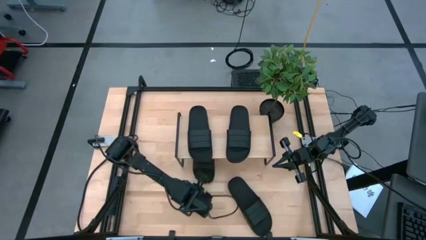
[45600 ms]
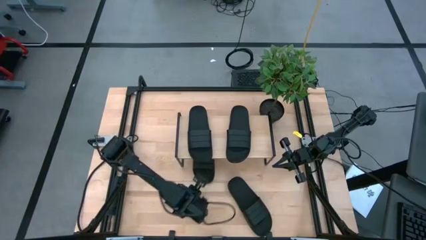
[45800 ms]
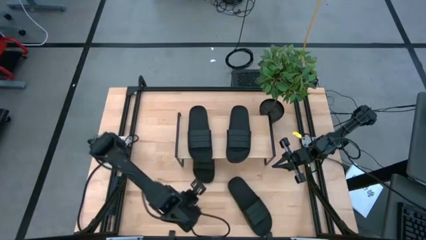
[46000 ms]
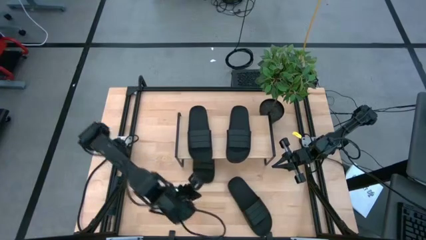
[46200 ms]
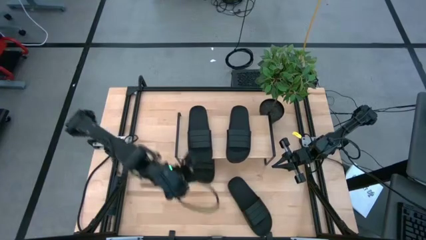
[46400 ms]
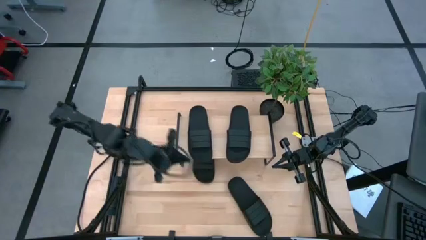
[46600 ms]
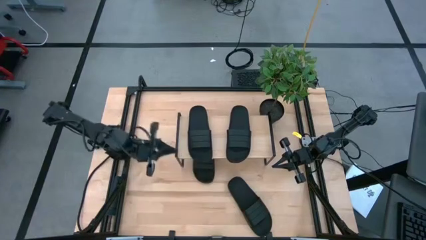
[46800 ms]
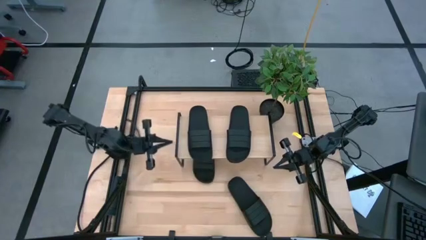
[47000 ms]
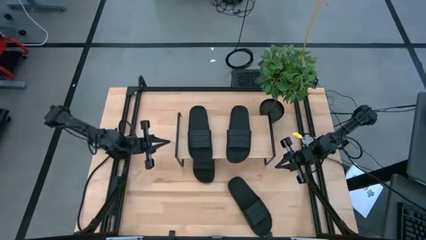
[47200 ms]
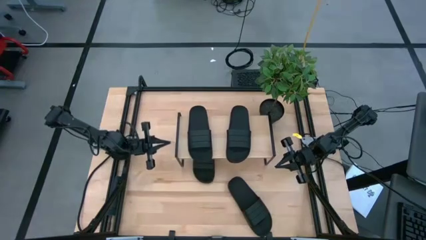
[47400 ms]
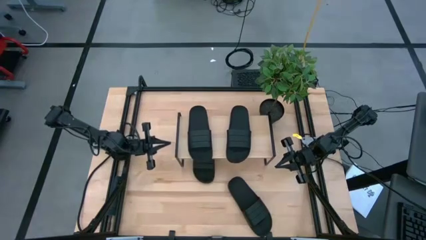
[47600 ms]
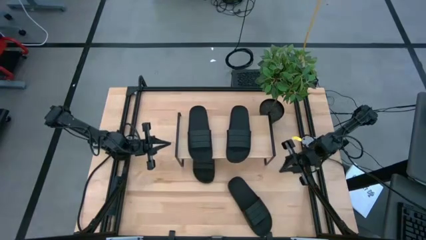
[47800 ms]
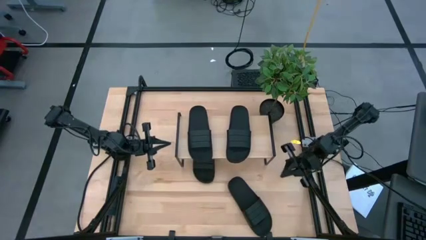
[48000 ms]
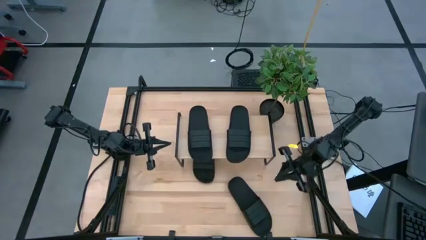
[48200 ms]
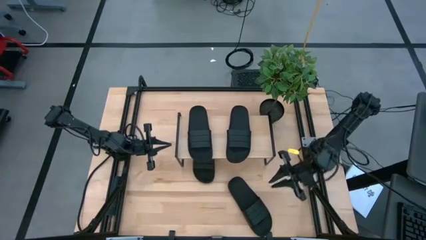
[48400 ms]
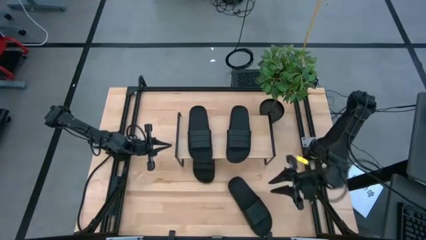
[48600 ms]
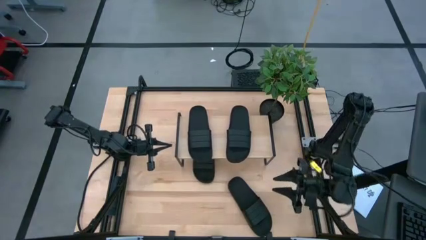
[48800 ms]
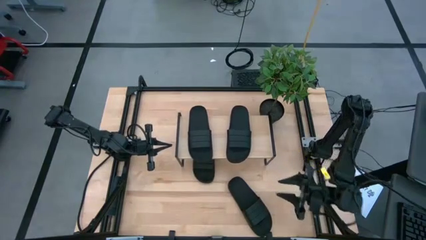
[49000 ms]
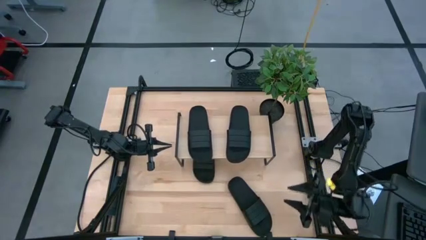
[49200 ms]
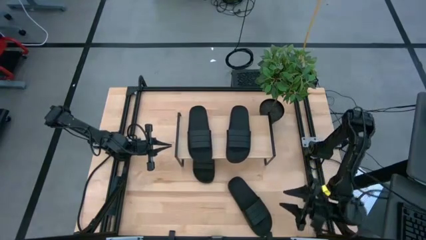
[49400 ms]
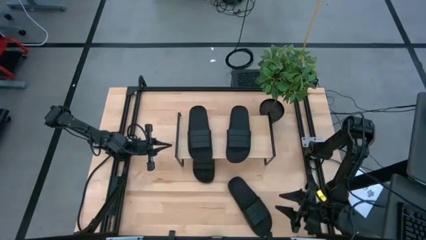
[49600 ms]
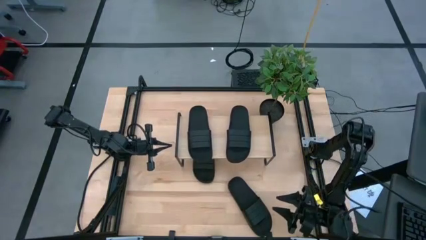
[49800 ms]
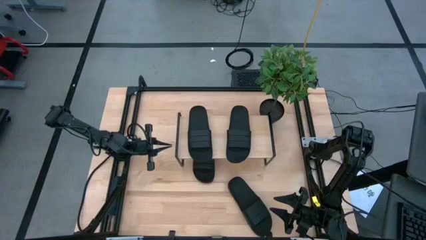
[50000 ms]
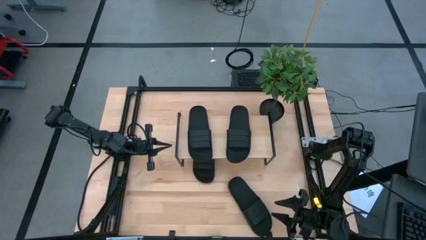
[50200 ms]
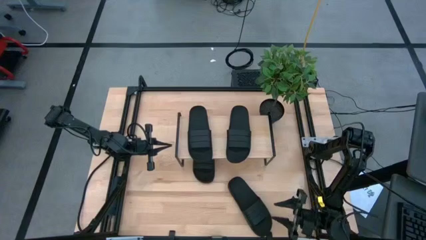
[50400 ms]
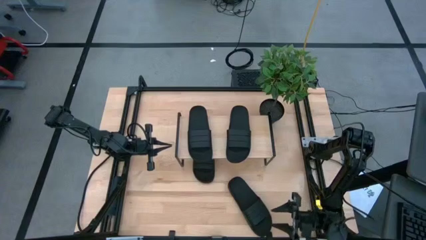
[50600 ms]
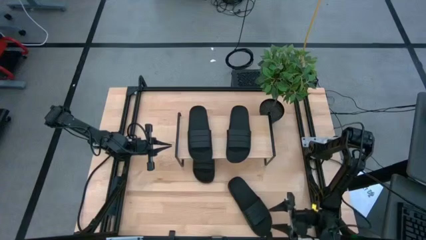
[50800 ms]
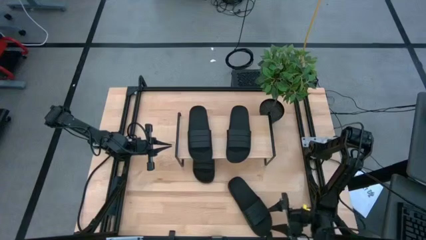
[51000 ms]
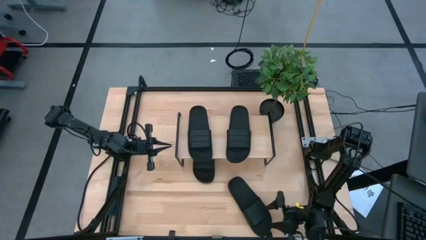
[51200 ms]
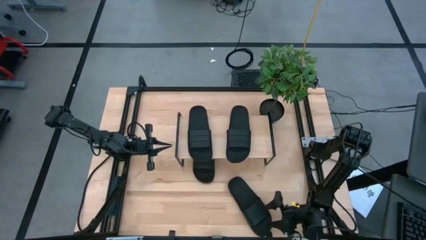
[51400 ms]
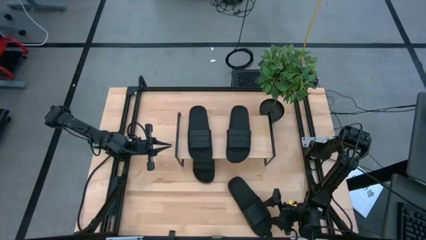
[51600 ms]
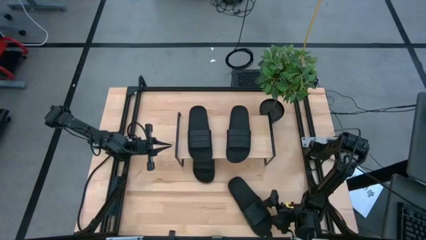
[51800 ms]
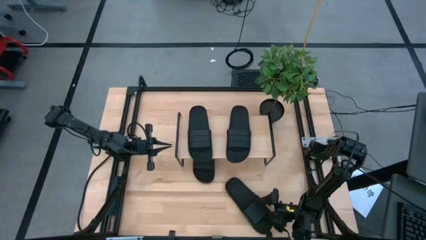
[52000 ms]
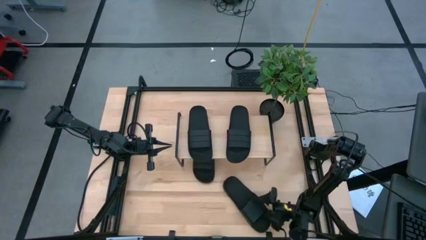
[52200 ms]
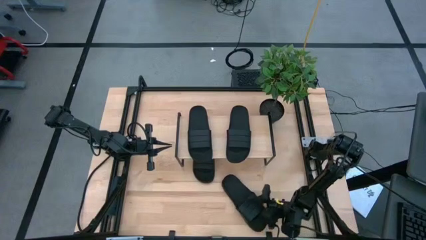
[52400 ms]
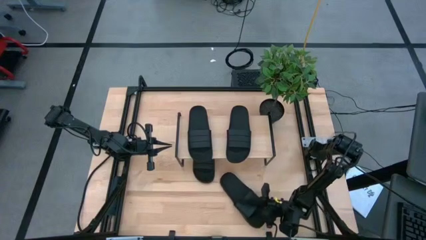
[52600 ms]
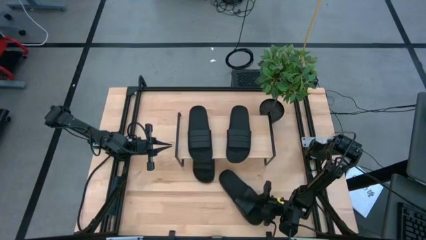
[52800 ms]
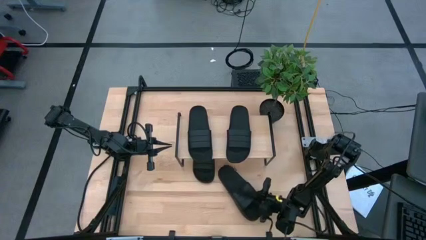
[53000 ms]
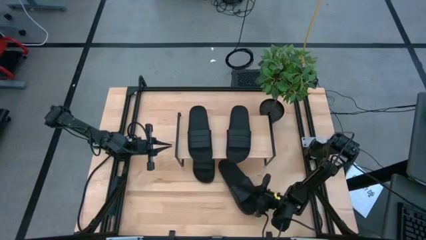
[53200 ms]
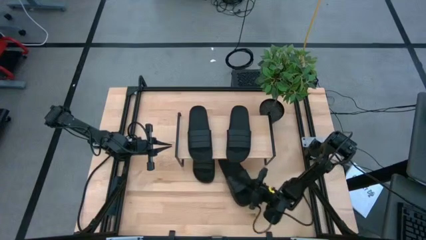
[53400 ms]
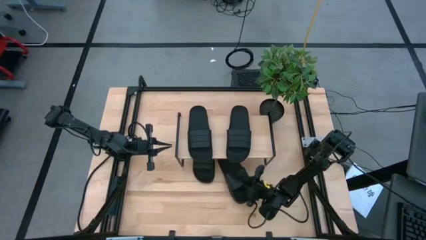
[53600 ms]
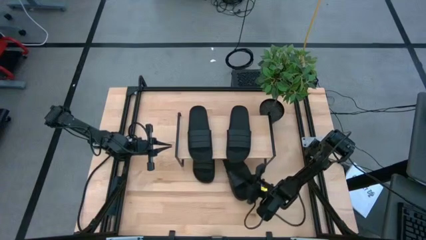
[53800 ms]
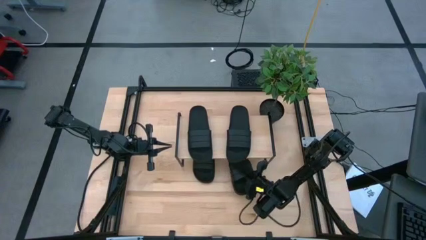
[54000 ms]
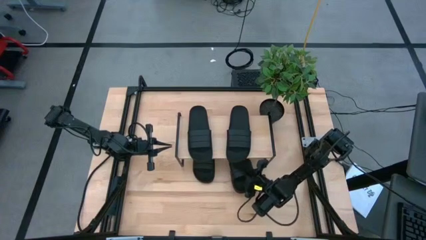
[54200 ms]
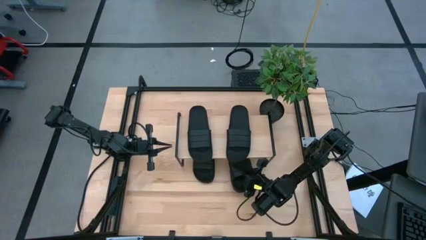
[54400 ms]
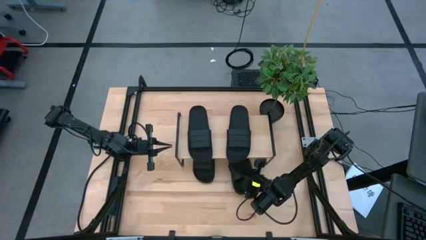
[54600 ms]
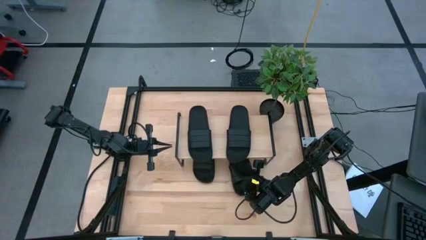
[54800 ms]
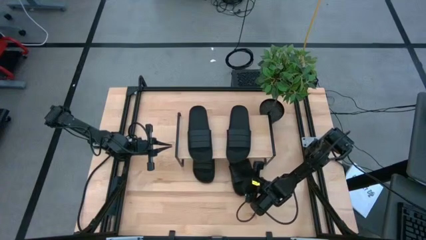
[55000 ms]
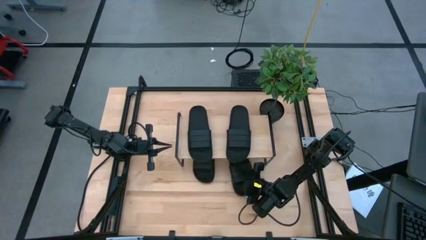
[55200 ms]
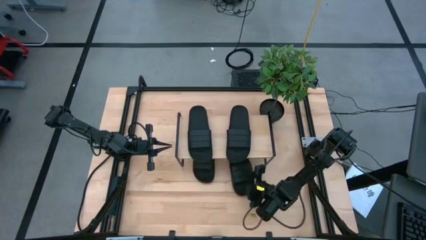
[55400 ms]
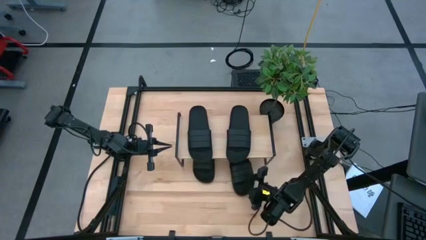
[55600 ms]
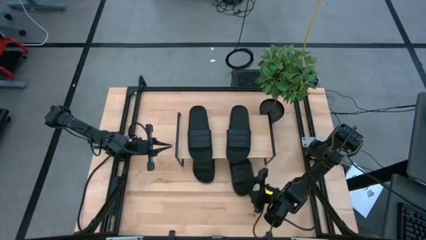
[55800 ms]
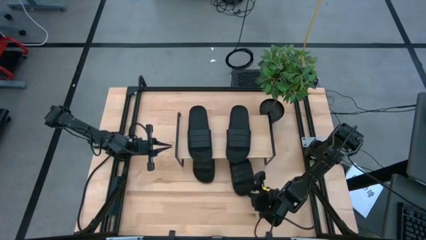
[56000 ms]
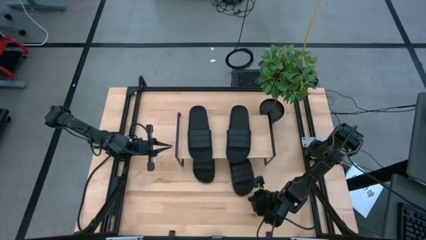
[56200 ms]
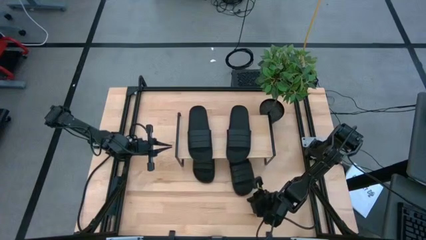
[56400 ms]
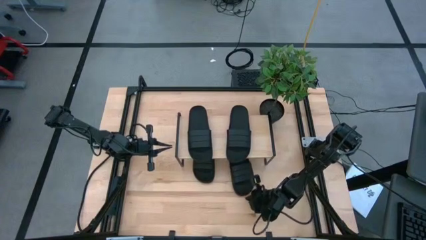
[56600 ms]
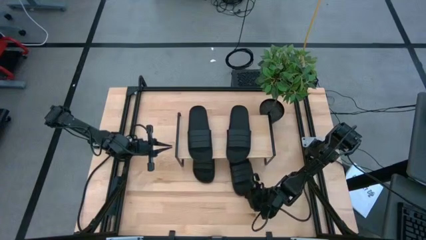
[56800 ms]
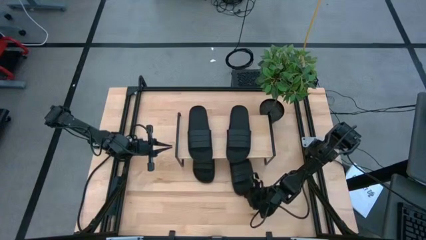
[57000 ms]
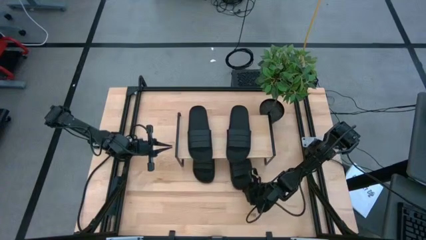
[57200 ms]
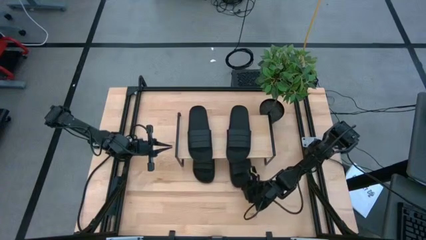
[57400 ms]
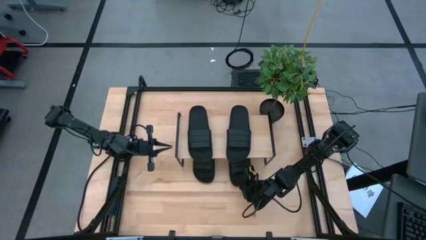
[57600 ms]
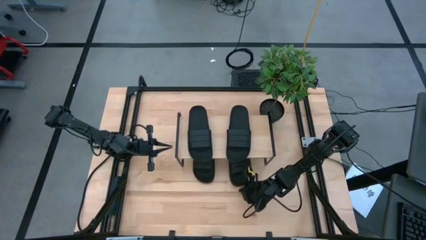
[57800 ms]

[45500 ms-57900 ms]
Task: Pick and place slides into the shelf
Put the black slipper under the shelf

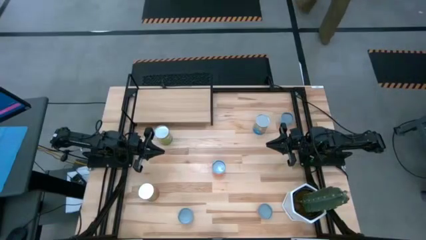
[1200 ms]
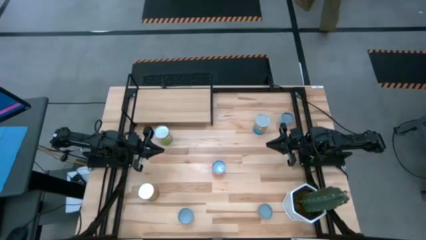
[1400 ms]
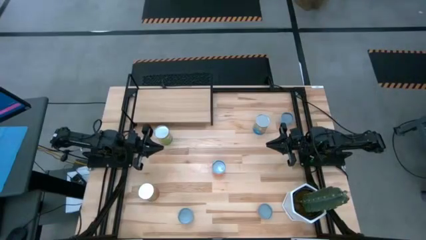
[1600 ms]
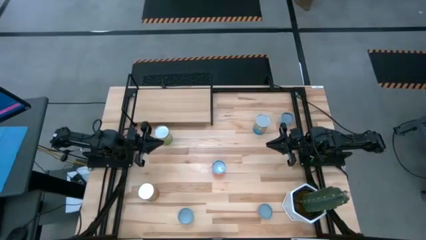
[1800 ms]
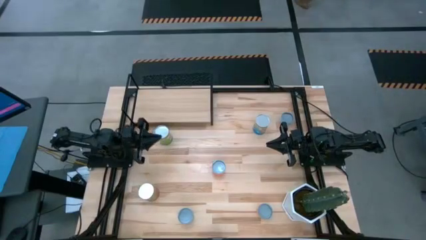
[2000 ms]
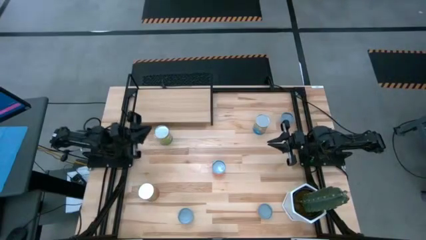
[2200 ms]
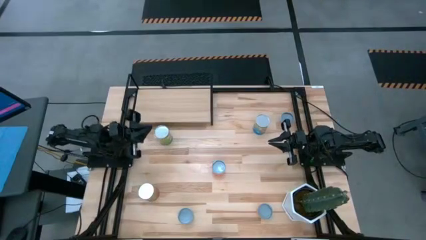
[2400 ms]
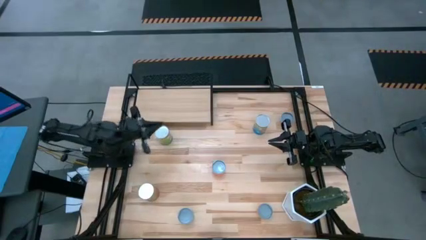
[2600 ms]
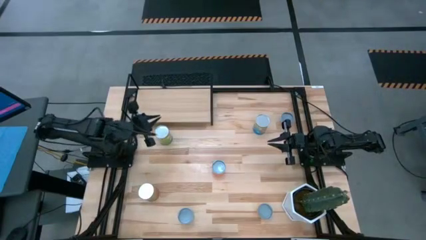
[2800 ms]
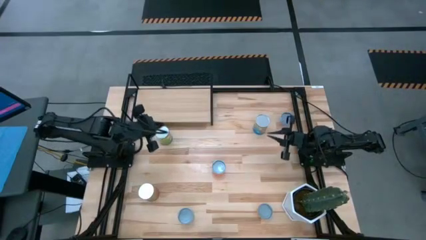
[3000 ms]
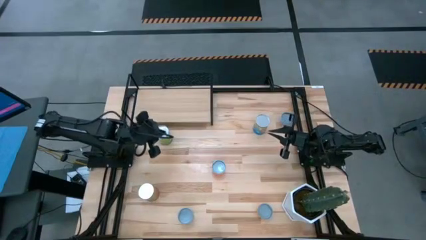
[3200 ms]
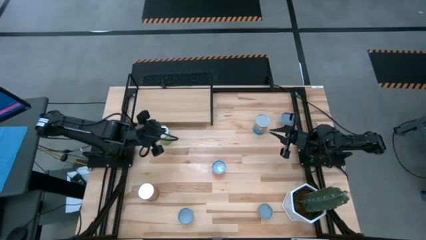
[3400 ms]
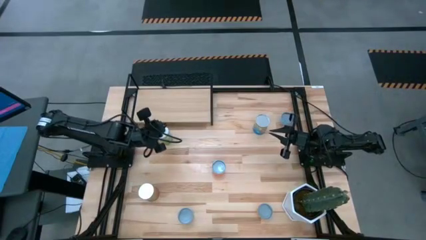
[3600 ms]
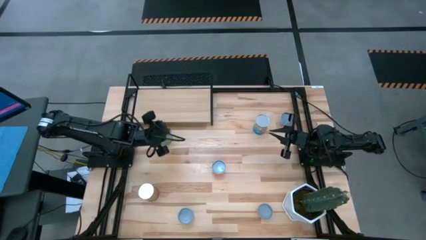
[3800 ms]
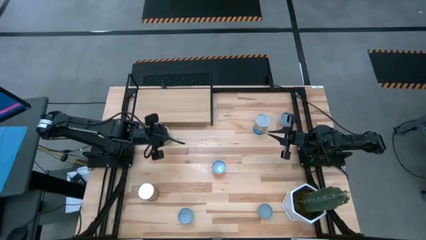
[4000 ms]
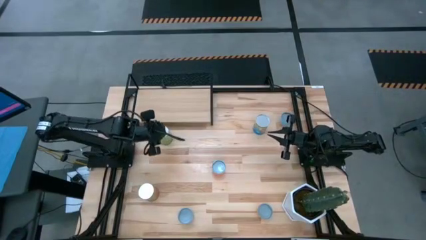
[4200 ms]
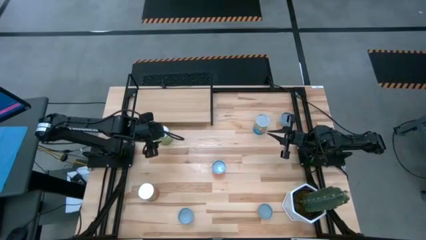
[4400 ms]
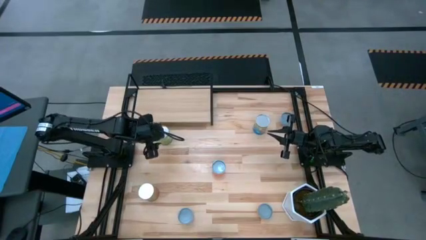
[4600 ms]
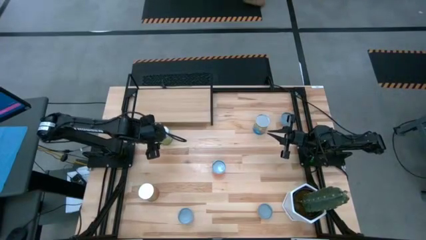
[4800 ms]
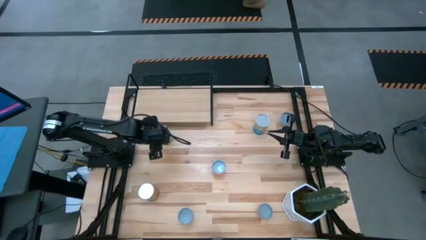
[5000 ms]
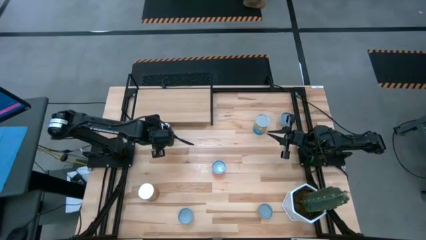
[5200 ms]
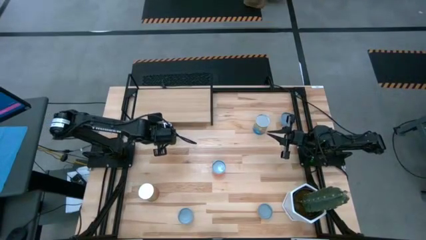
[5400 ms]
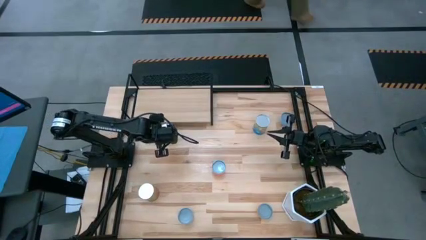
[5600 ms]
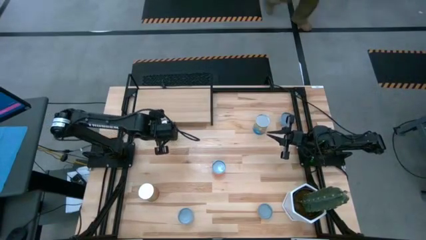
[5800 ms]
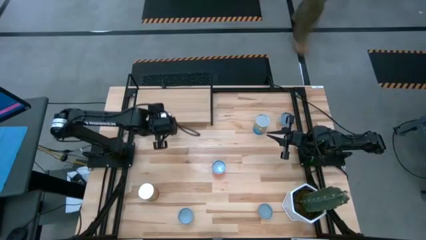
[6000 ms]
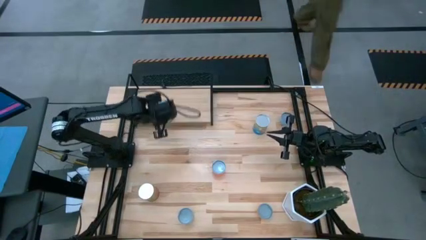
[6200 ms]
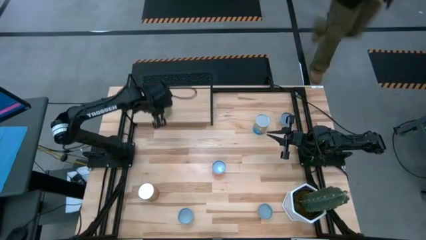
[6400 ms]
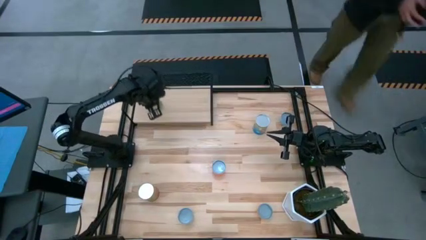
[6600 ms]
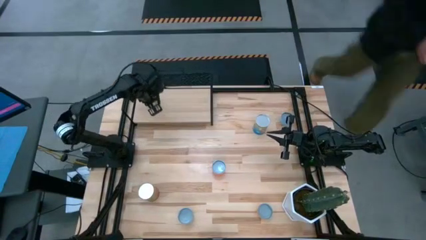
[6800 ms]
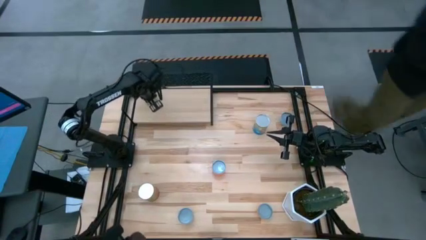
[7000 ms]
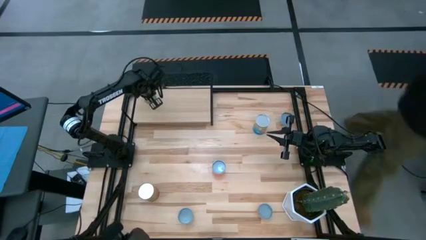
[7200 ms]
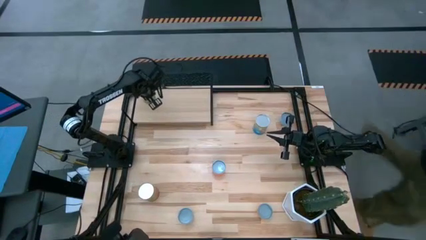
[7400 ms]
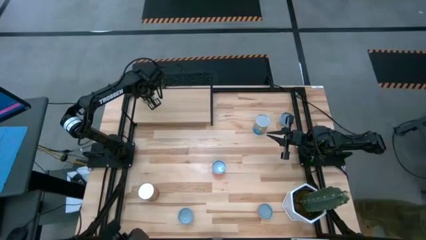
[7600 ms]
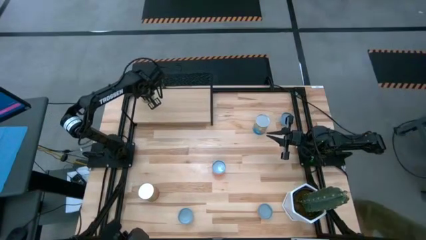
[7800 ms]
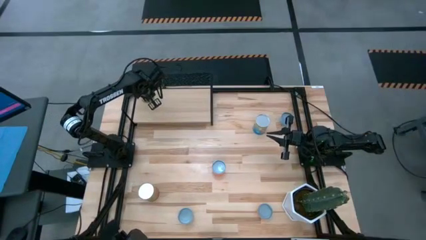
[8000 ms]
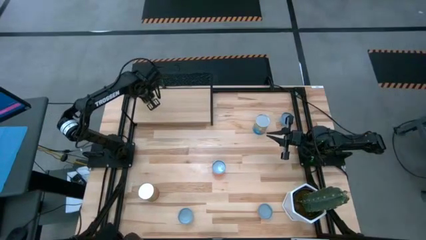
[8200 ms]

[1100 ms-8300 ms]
Task: Pick and place cans onto a shelf
Put the canned pears on the shelf
